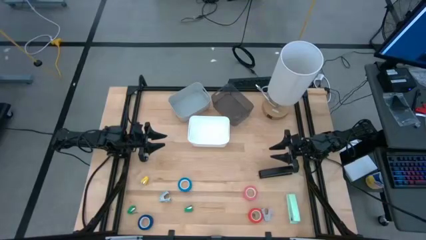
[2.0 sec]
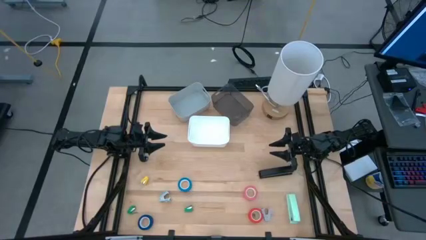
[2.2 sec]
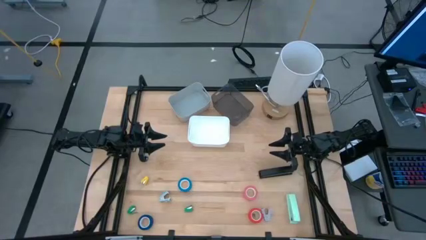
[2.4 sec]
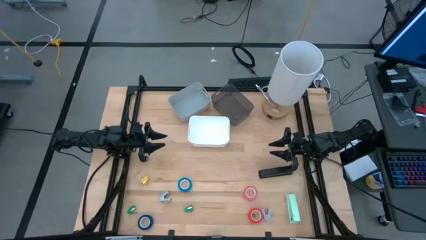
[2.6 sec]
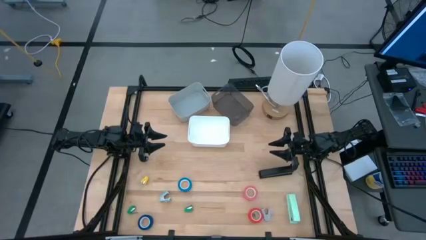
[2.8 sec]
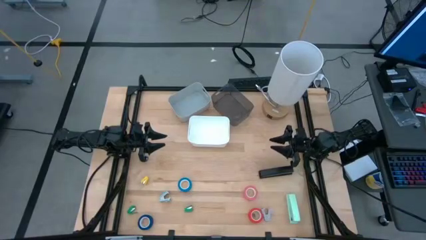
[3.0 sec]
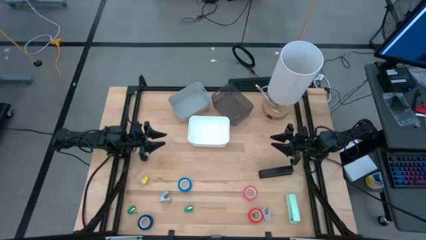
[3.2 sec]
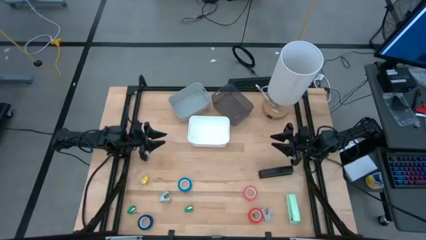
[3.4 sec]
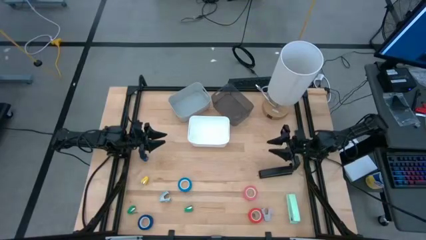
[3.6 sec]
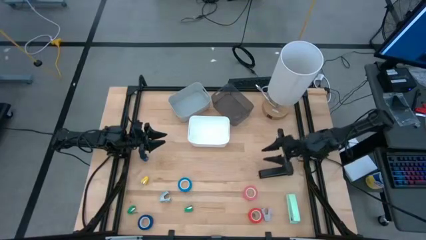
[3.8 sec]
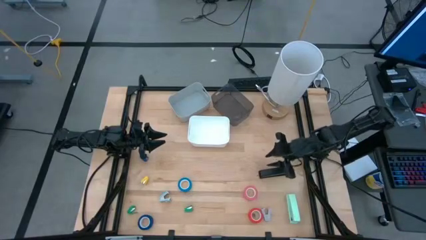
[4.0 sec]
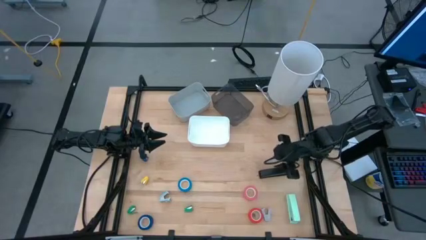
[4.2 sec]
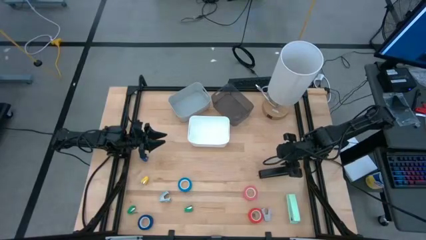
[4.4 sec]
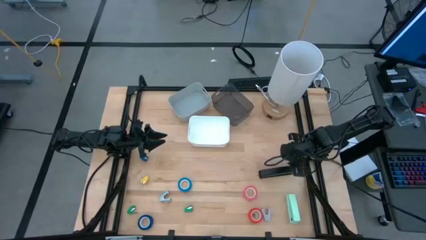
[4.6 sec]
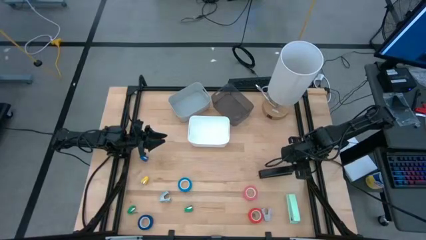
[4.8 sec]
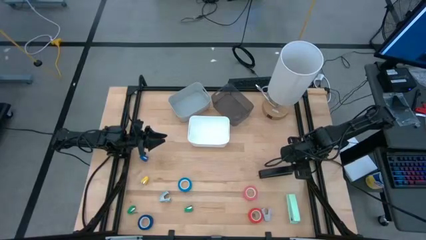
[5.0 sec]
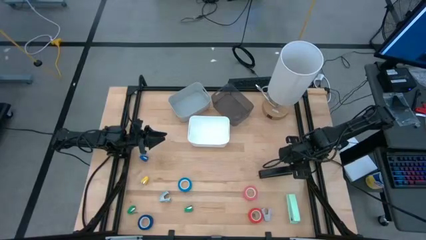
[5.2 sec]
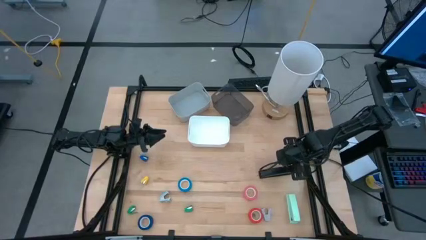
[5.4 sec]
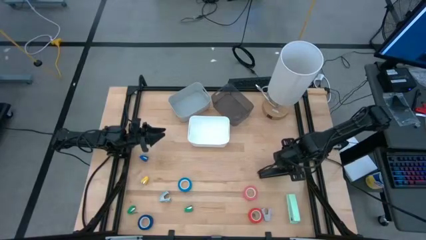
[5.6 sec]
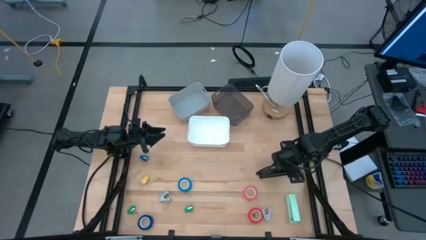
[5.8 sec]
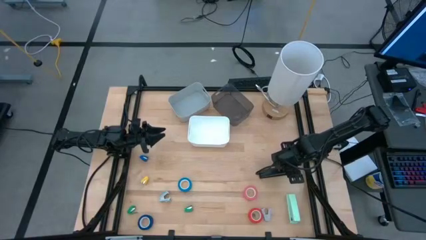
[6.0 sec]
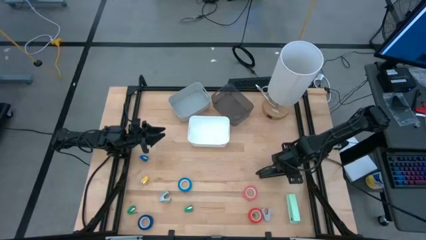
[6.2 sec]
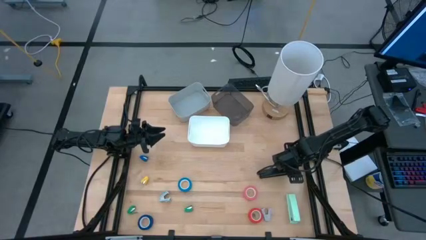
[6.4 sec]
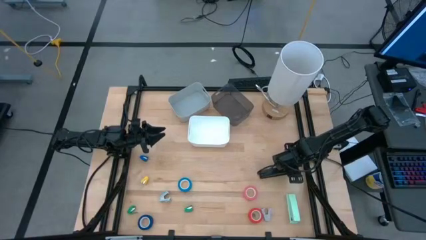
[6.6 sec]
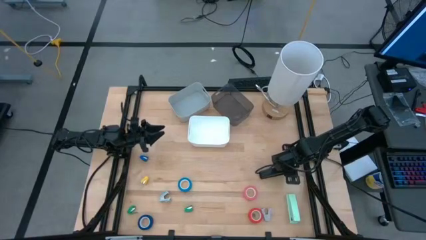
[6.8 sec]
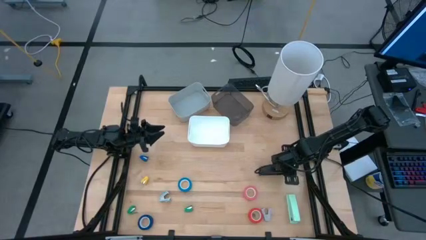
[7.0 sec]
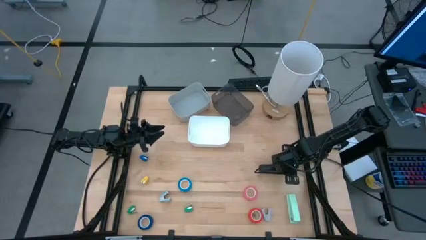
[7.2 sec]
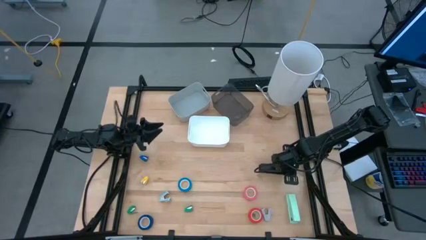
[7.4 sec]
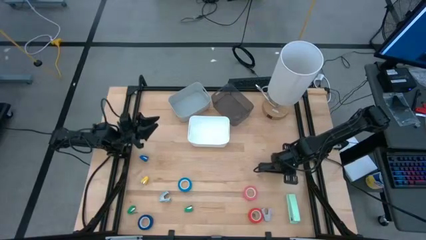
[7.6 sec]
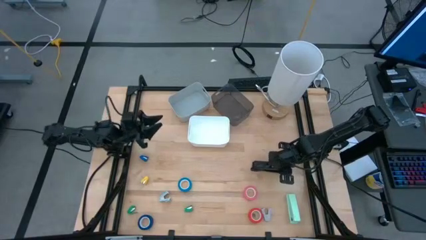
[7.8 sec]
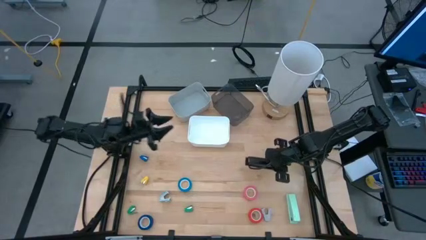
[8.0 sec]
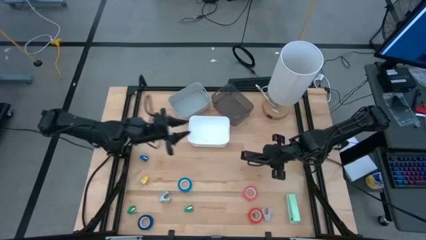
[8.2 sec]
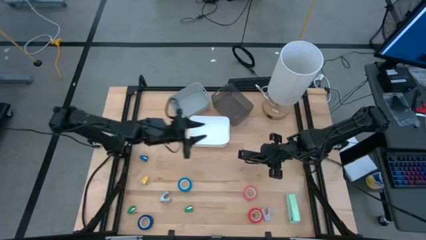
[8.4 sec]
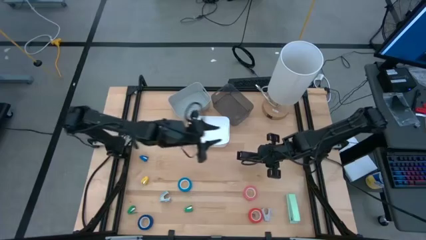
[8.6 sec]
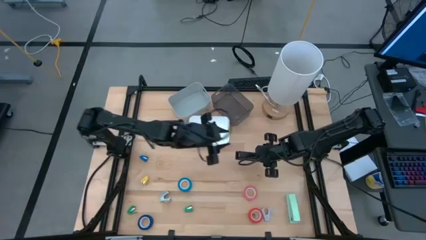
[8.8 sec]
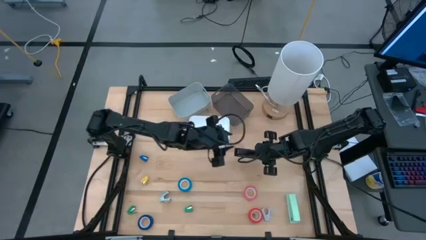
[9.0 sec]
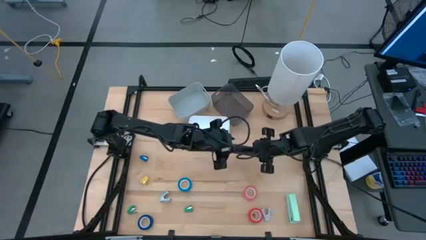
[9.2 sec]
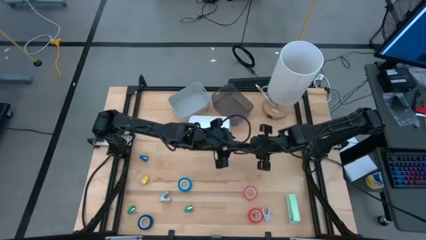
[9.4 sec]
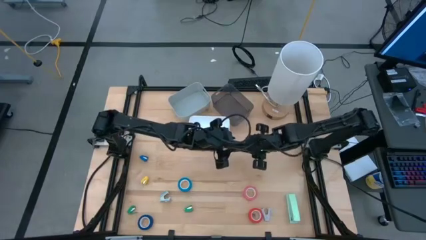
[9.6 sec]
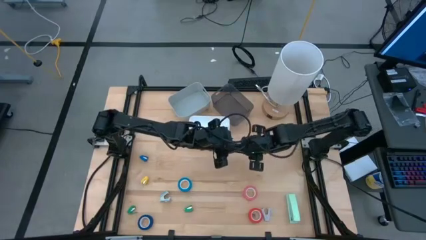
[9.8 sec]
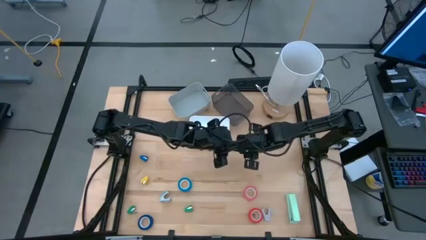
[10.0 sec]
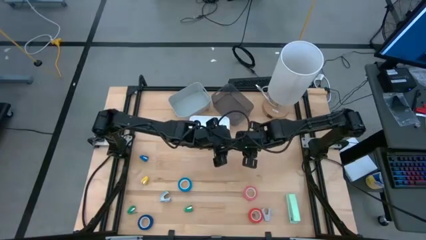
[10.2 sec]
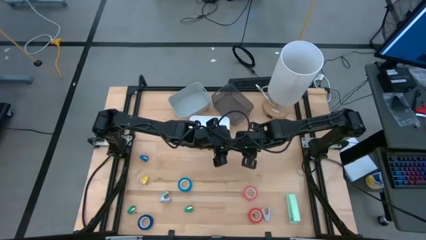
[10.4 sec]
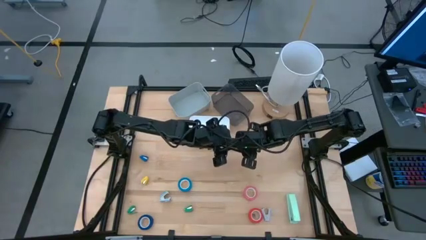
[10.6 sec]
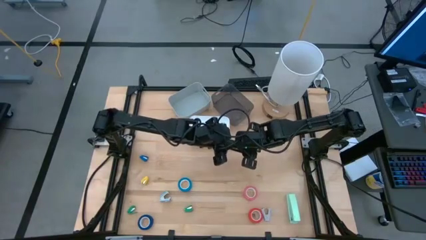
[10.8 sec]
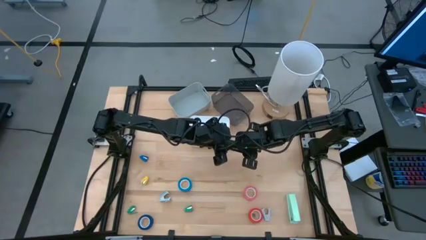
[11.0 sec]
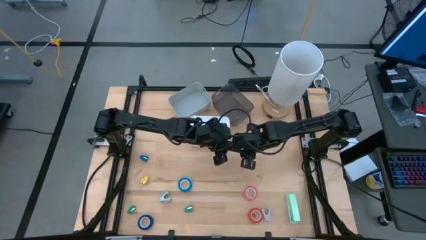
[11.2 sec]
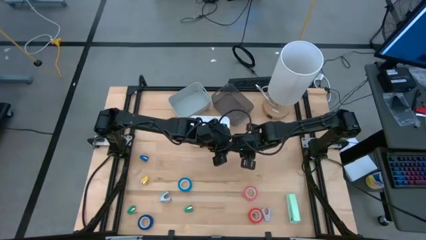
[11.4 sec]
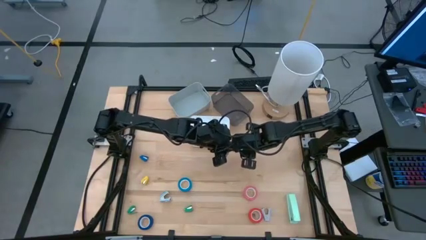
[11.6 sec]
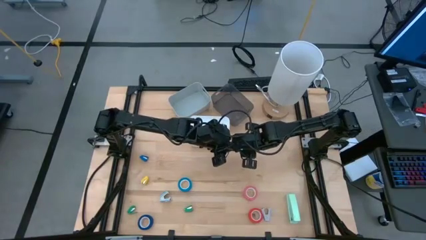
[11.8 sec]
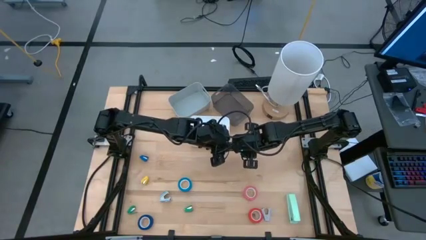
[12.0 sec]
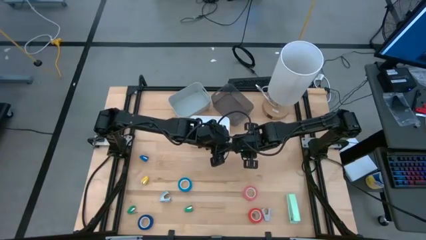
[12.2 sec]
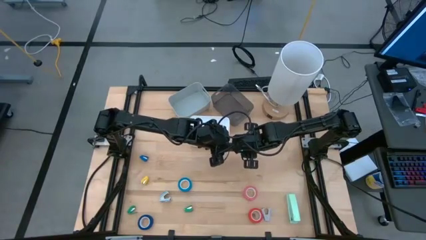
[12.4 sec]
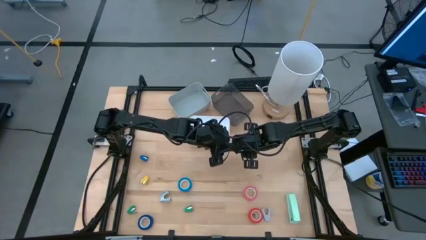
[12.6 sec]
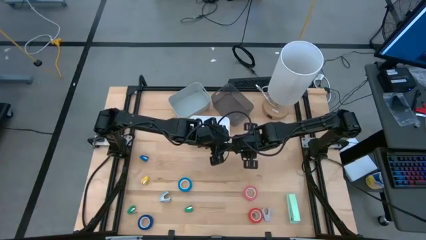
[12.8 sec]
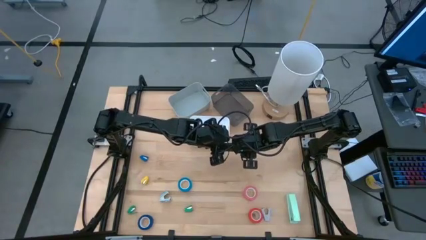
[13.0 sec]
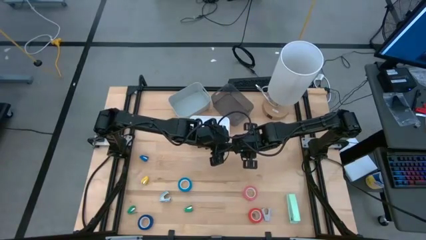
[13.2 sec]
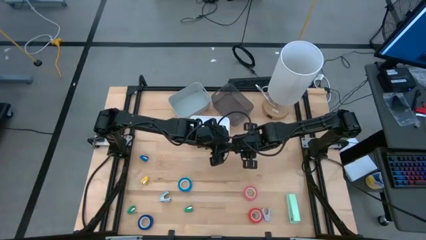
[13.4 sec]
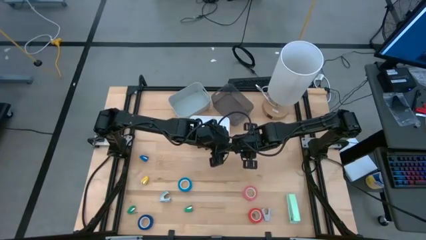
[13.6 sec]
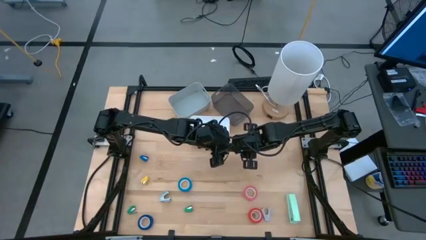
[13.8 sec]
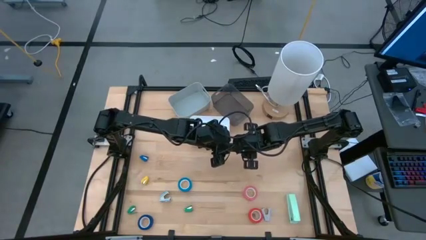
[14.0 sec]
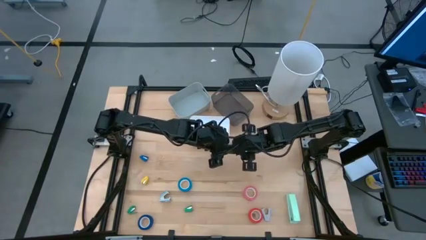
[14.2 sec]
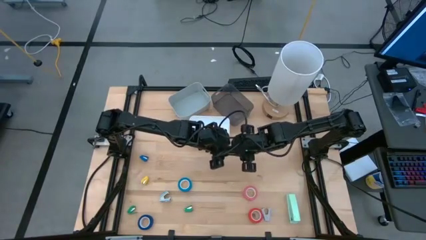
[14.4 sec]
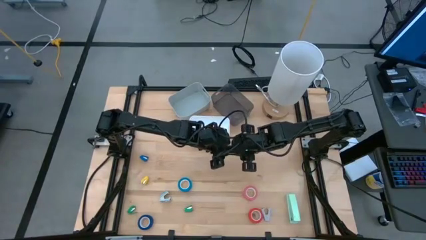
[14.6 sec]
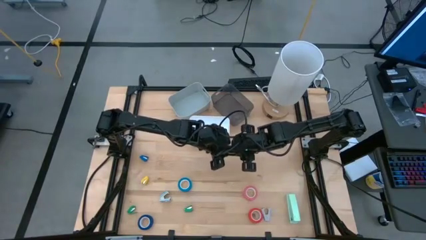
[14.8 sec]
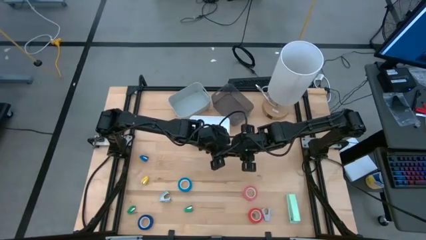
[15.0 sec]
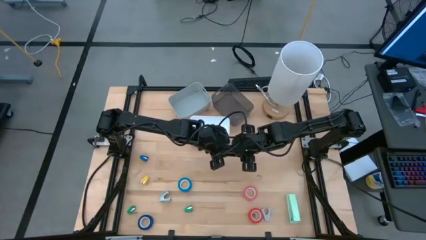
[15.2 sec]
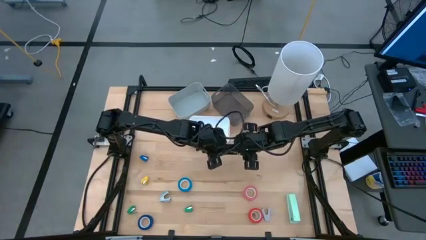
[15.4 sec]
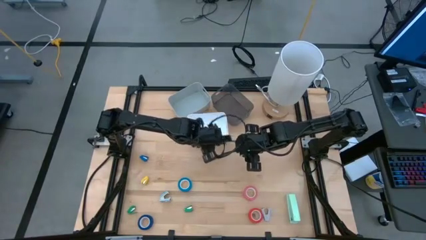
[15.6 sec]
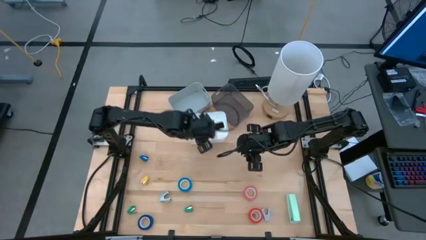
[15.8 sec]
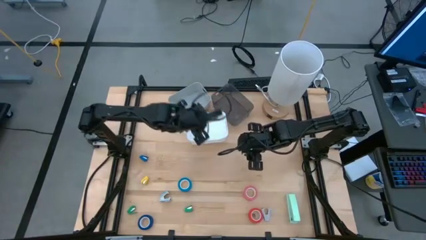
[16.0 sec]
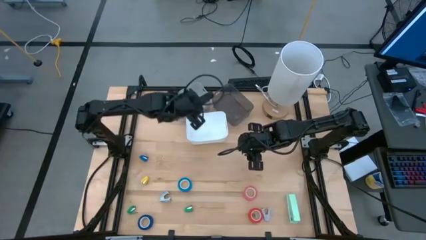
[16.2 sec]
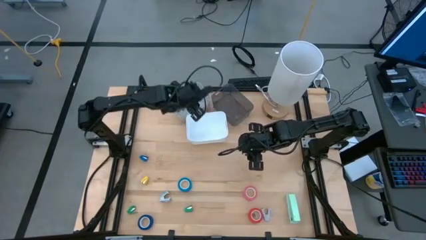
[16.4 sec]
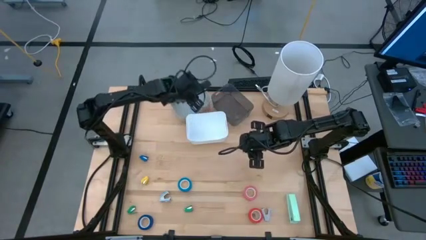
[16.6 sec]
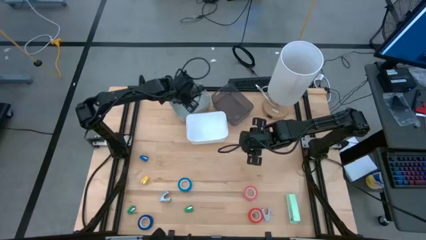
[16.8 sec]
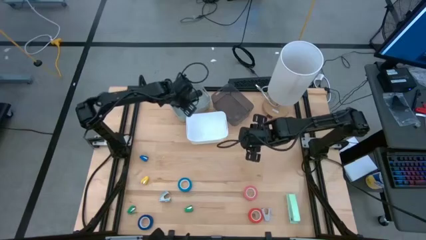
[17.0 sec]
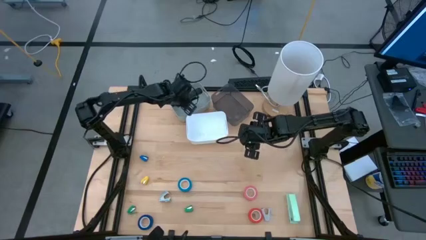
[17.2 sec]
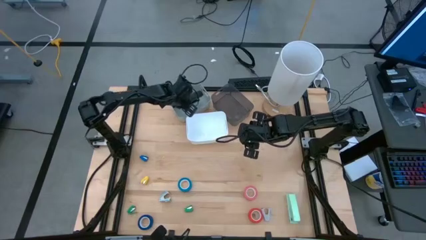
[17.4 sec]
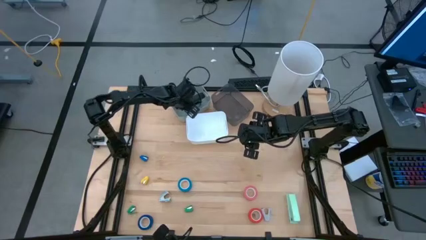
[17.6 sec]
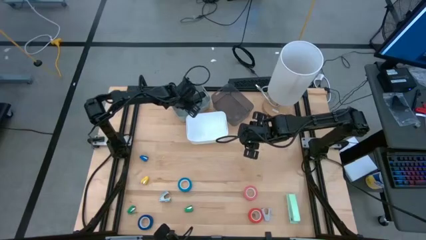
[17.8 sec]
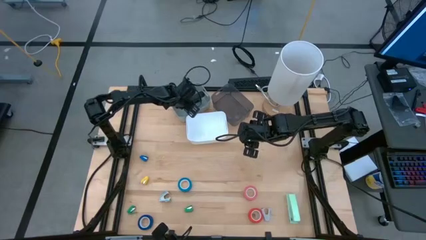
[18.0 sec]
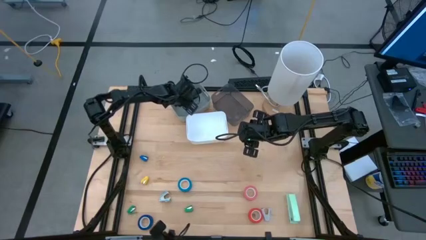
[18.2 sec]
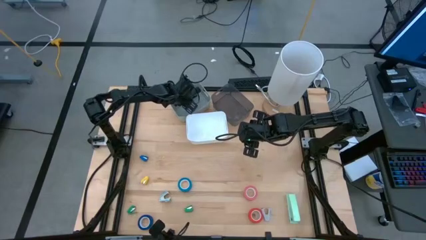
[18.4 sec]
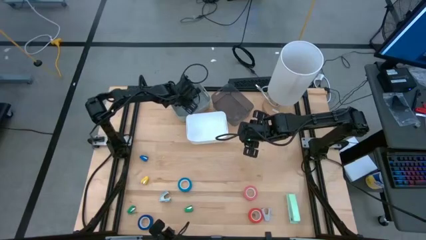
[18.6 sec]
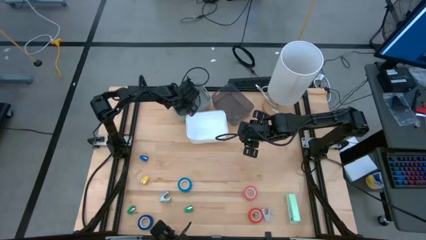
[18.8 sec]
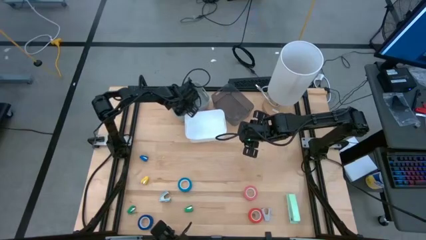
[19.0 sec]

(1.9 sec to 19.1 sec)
Task: Pick and place Stapler, Stapler remover, tape
Put the large black stapler into the gray bin
